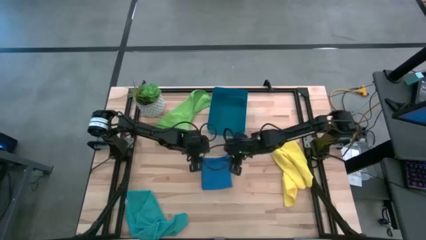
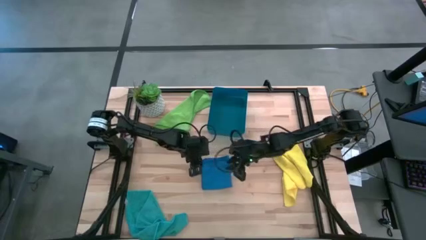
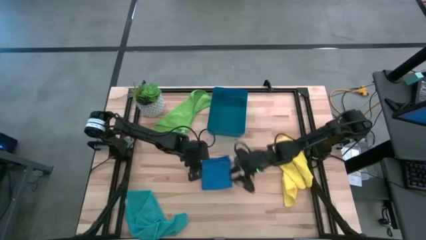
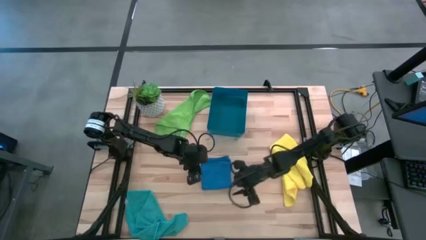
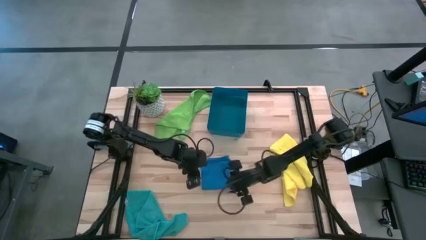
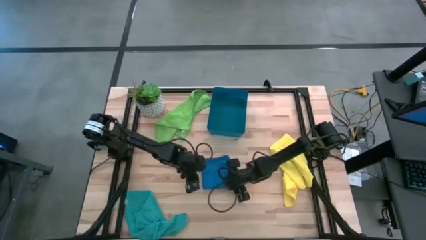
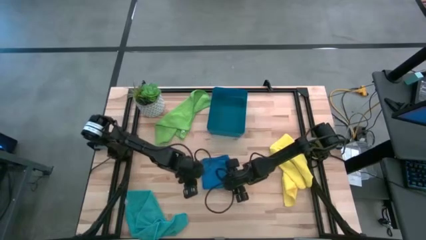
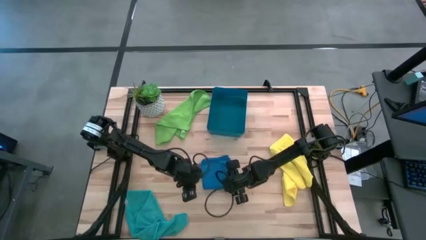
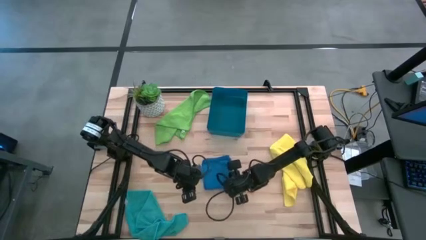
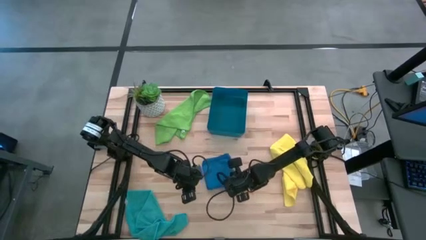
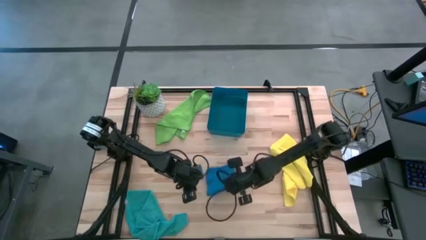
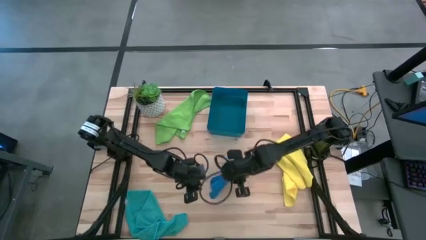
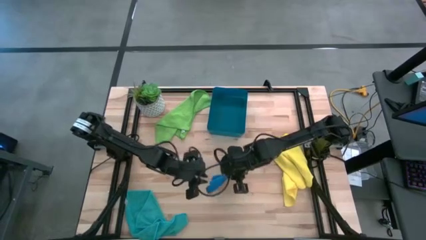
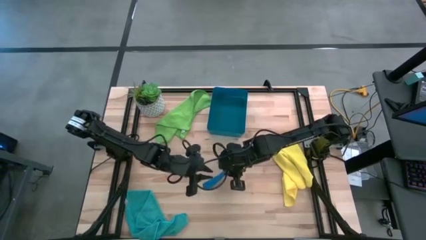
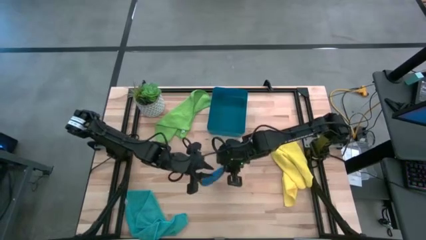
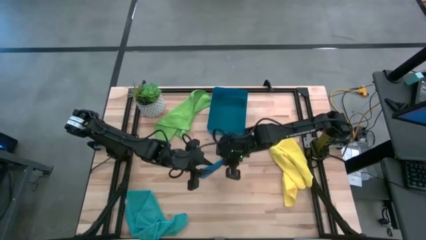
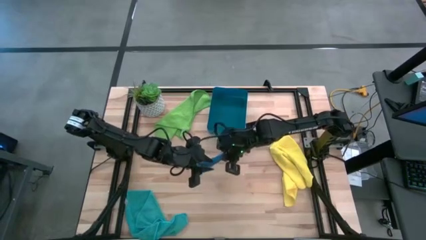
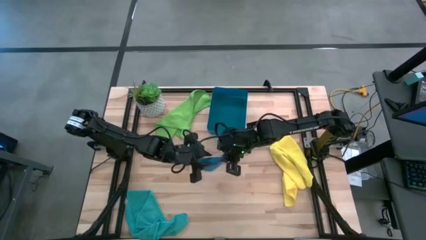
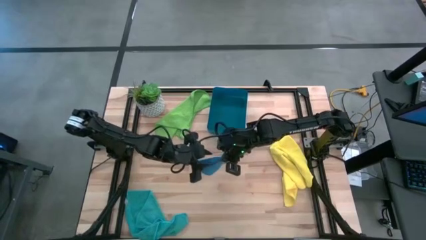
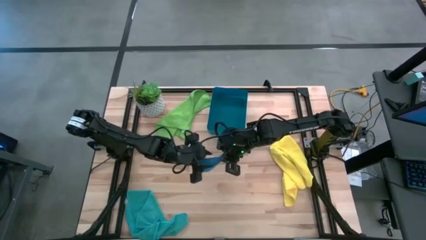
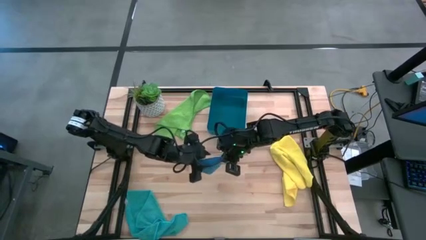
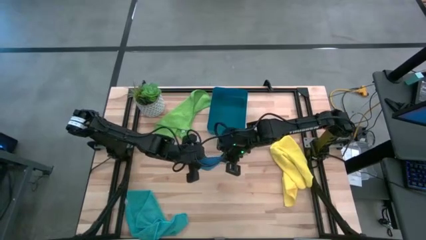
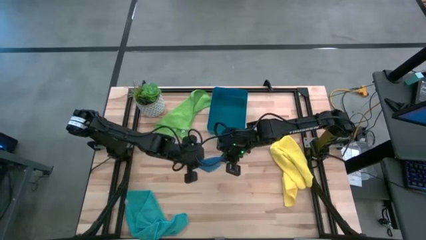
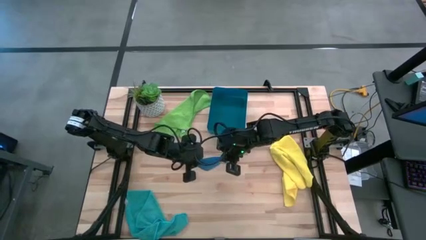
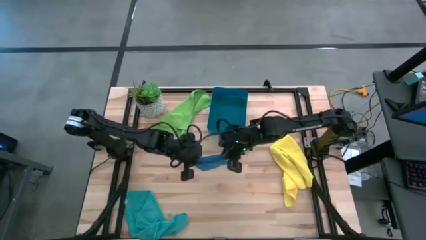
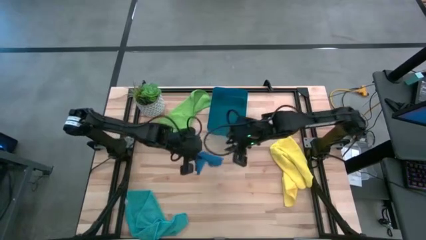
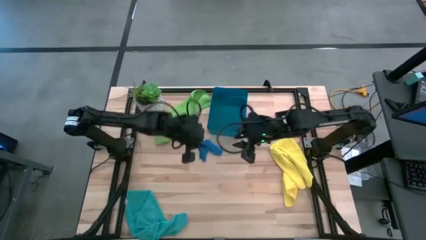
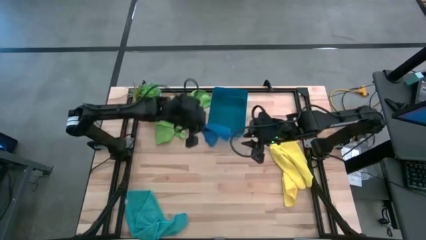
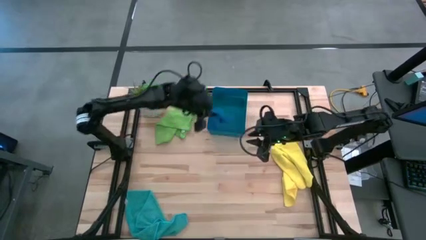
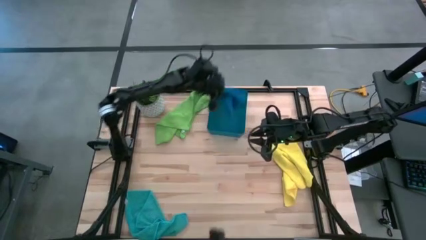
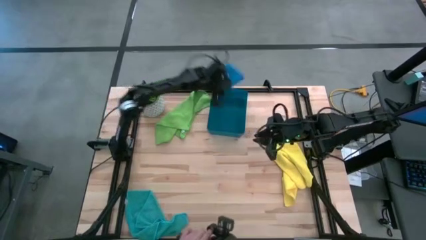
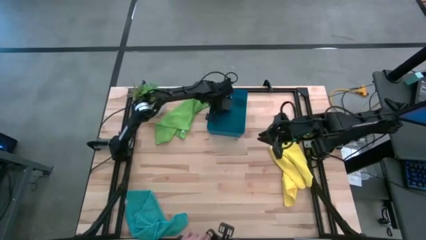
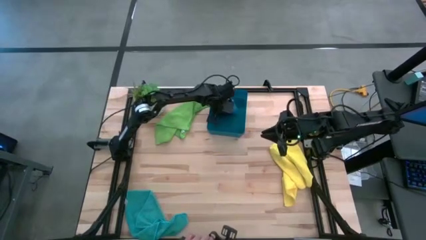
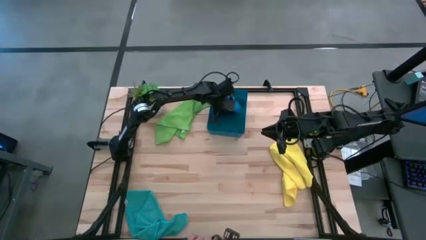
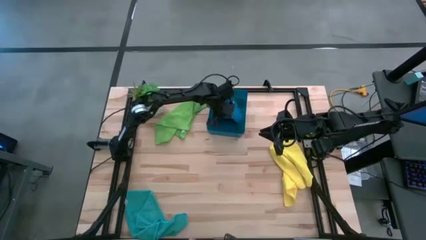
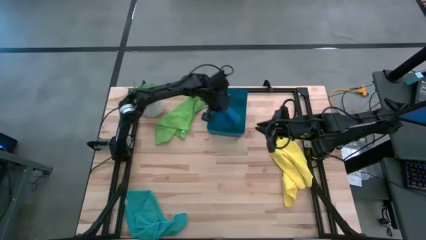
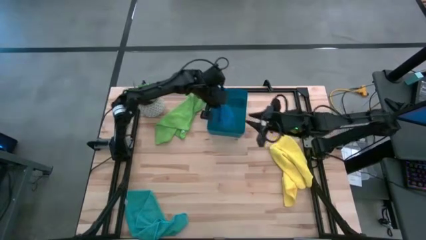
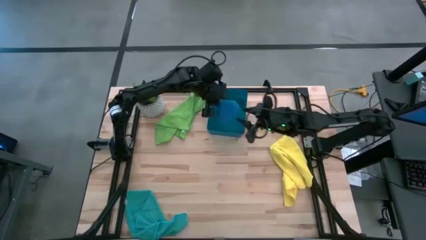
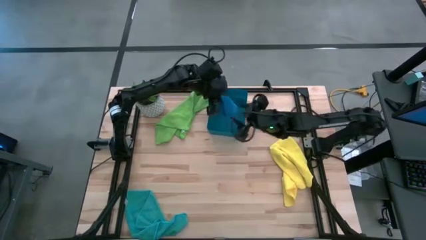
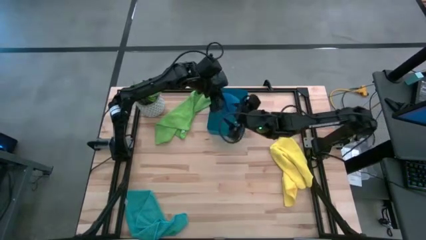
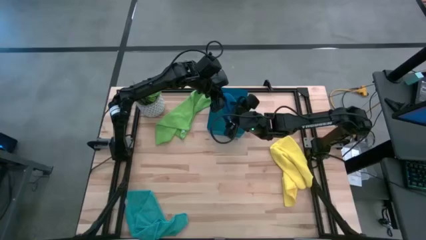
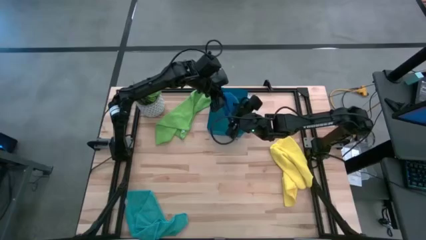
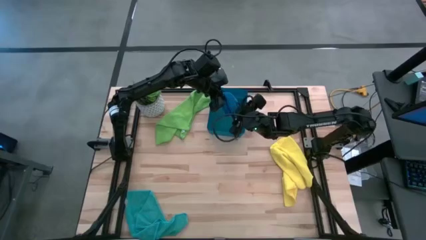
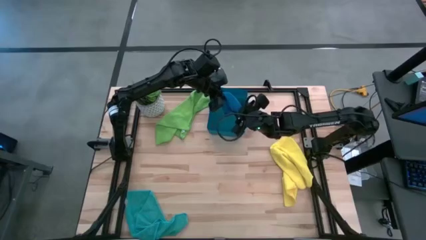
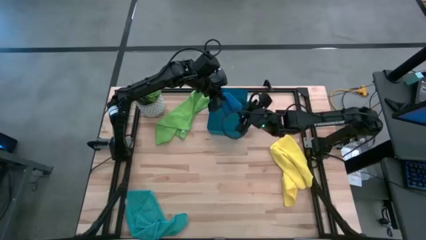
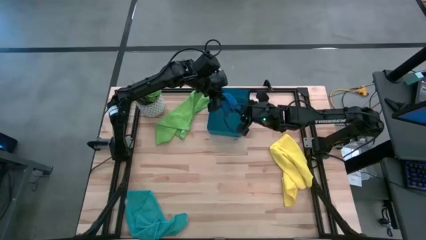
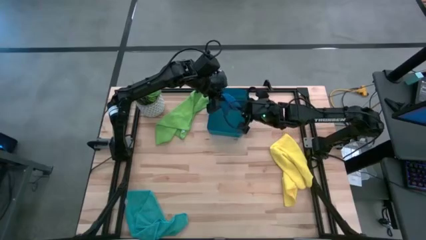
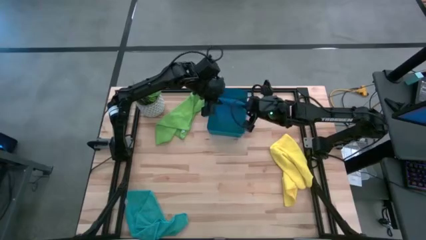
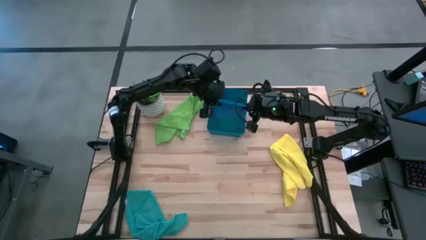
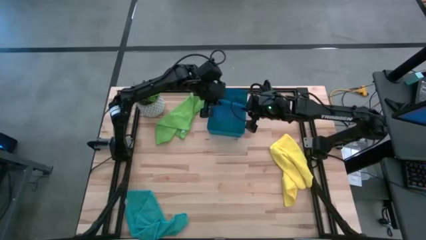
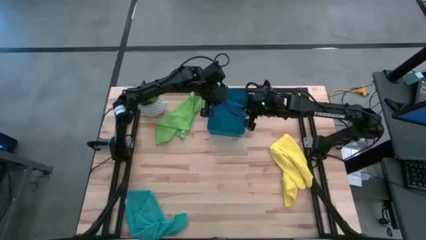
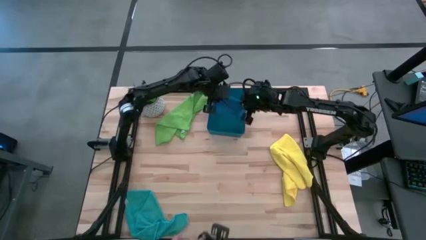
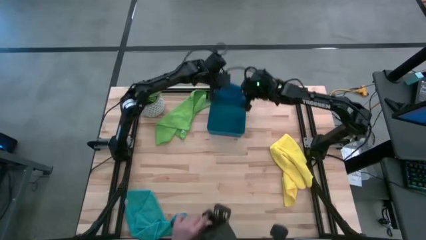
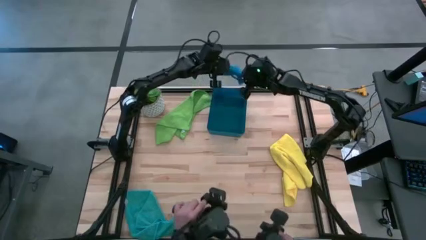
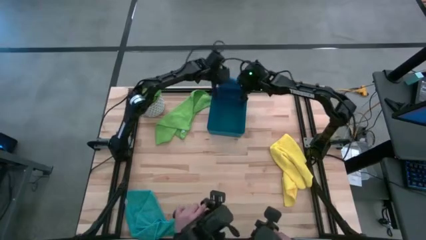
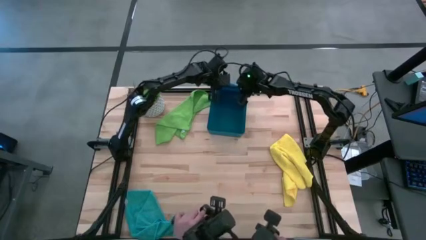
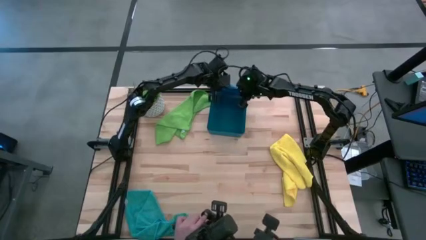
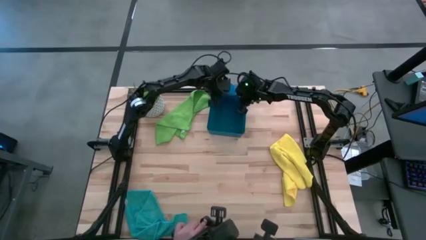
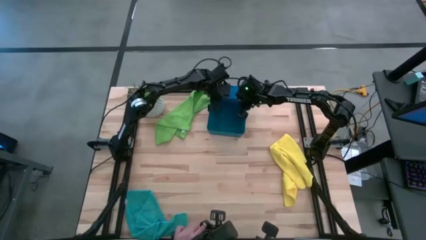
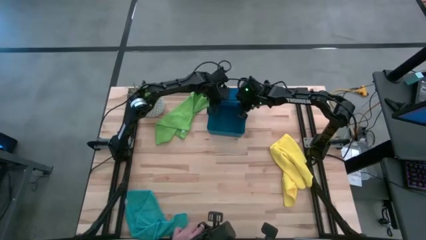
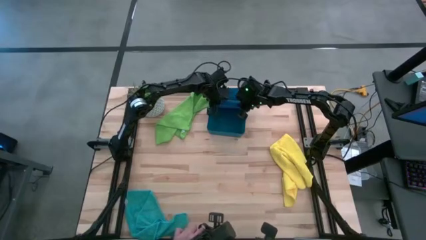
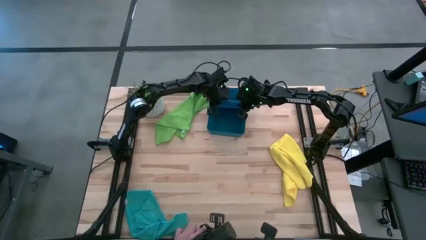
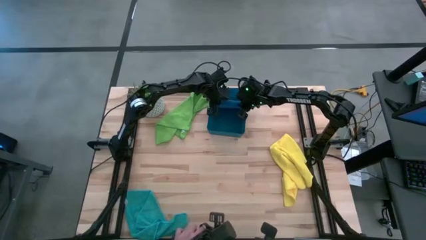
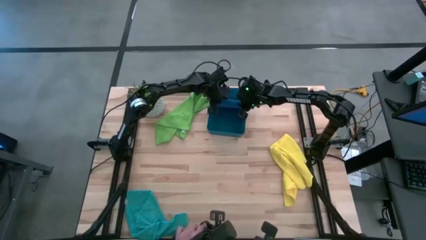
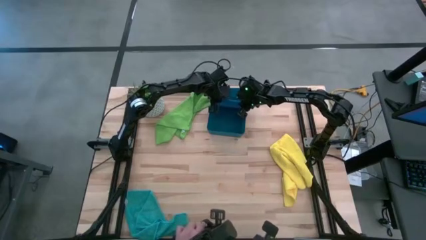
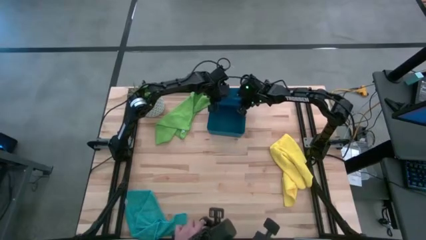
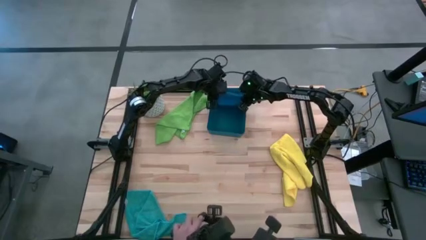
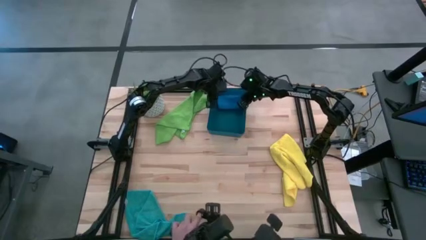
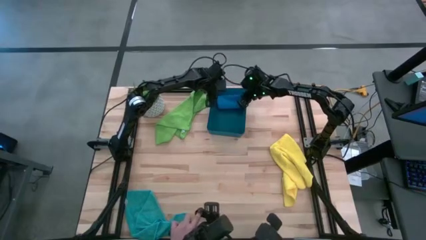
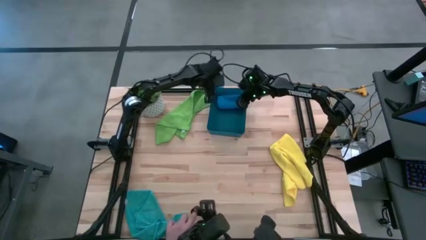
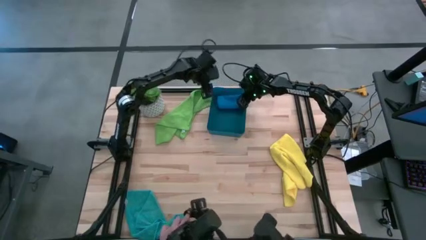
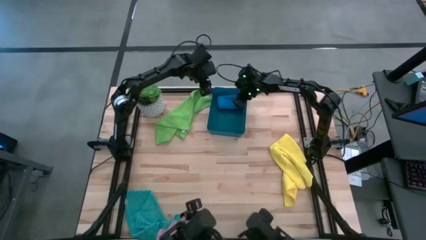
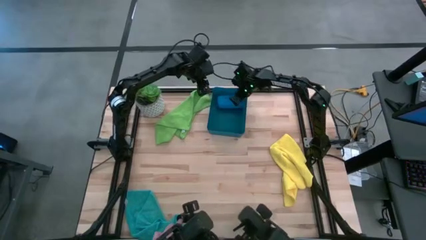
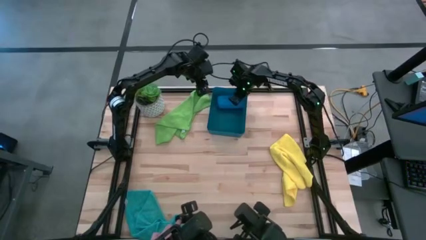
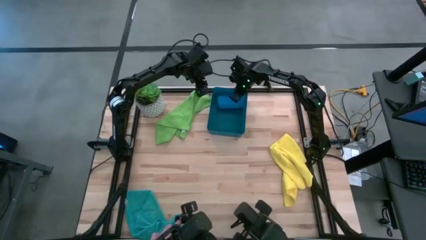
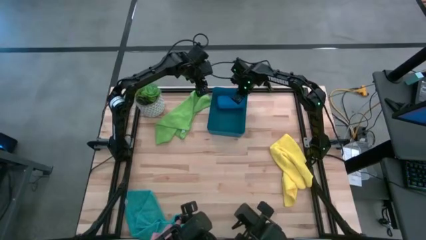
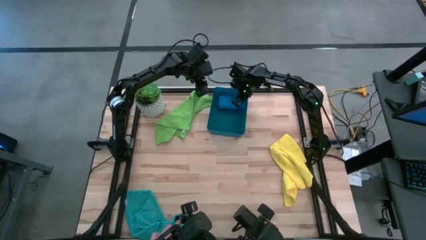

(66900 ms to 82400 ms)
Task: Fold microfiber towels
Put the blue microfiber cloth into the blue bin

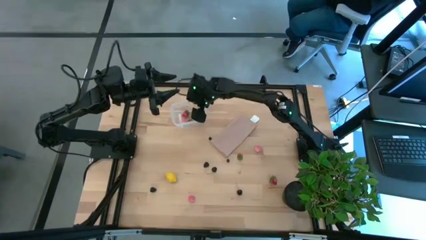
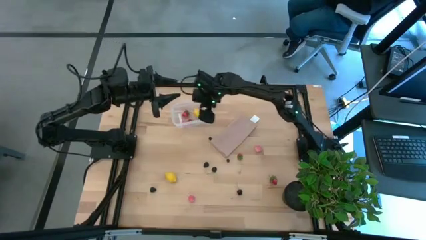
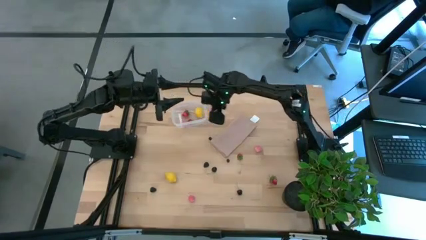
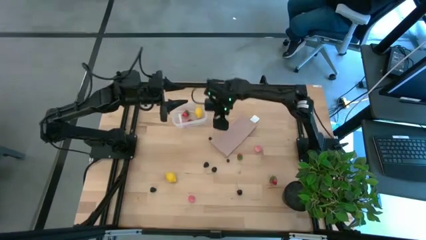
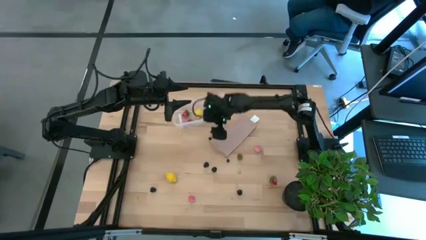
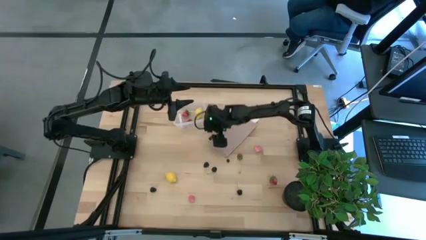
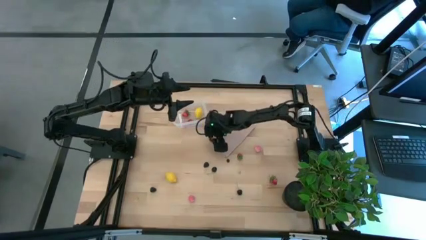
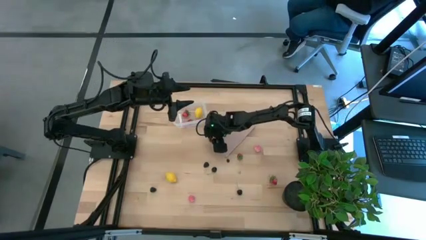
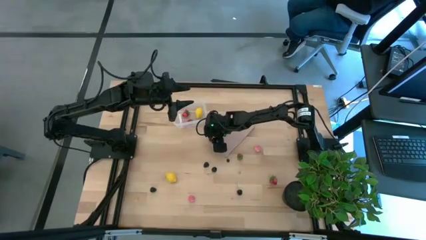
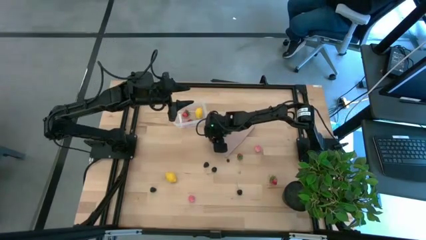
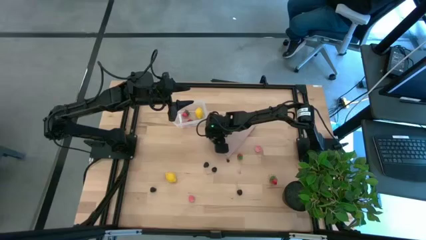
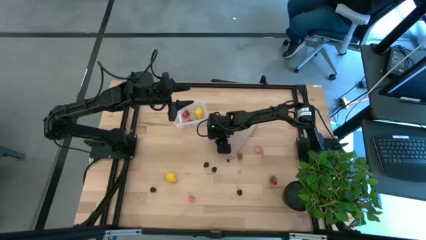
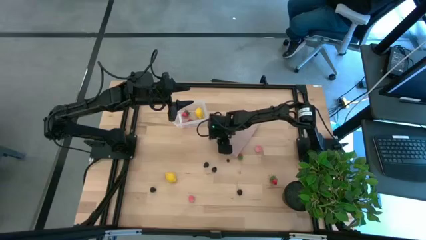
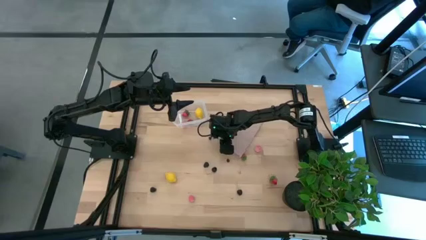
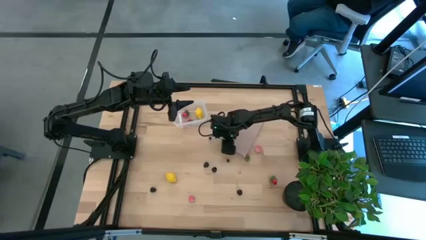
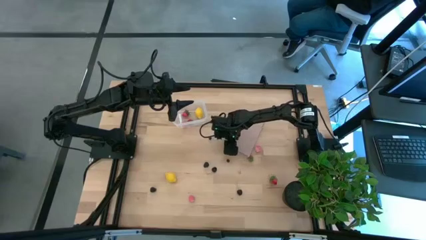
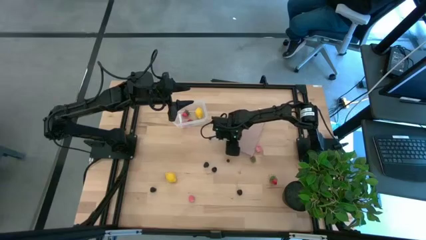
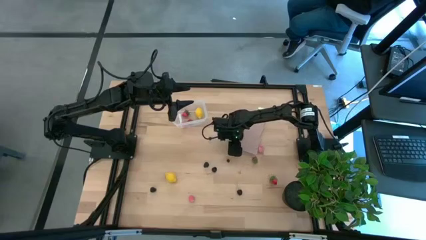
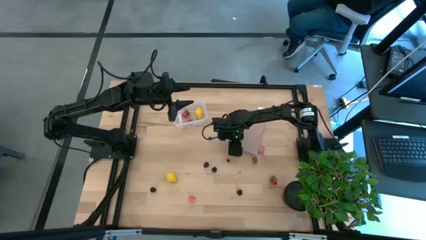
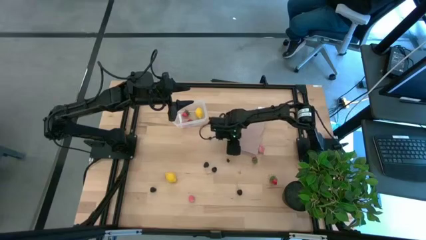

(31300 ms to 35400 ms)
Task: Pick and placing Produce into tupperware
Adjust the light brown napkin
